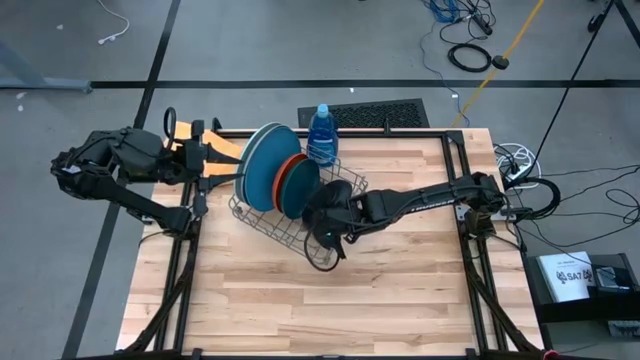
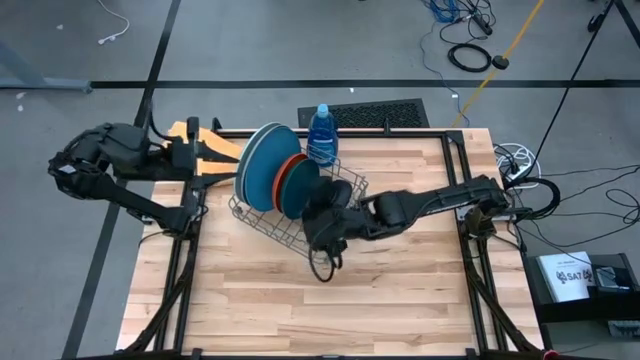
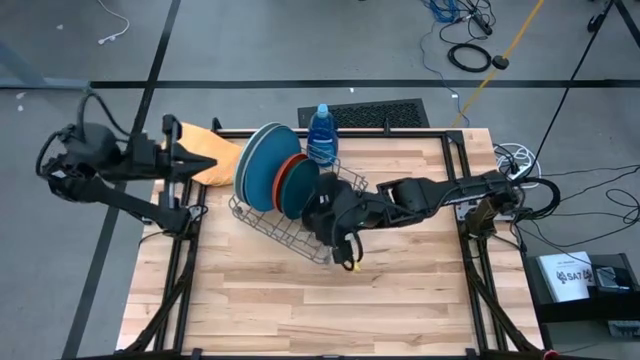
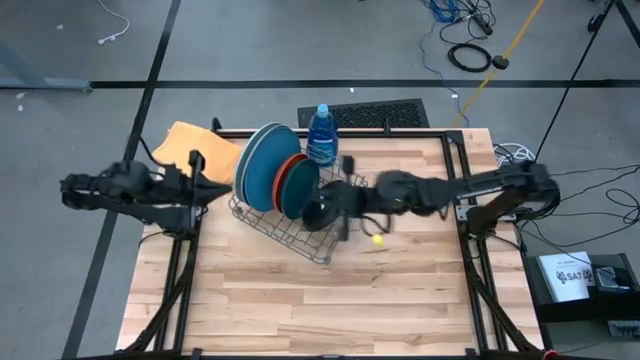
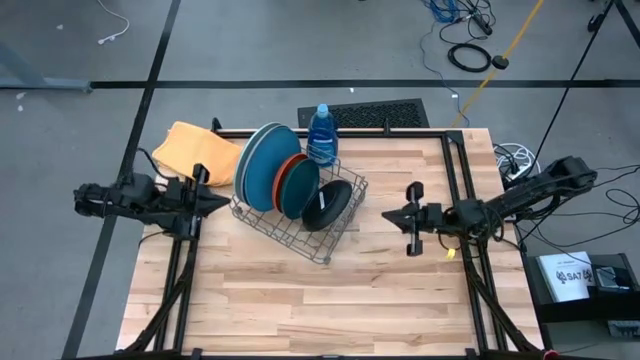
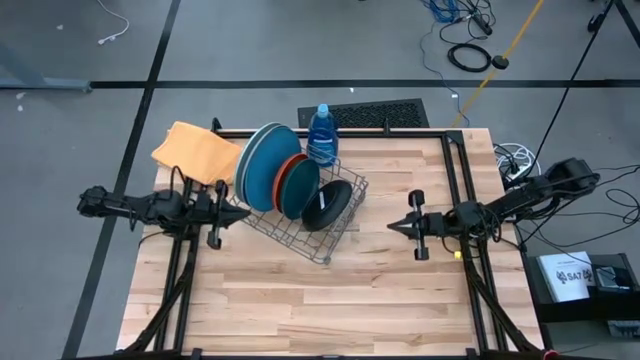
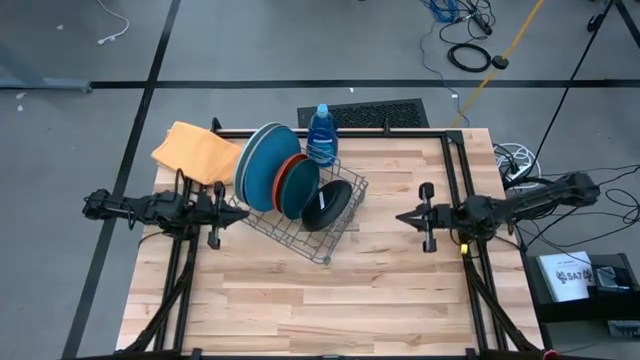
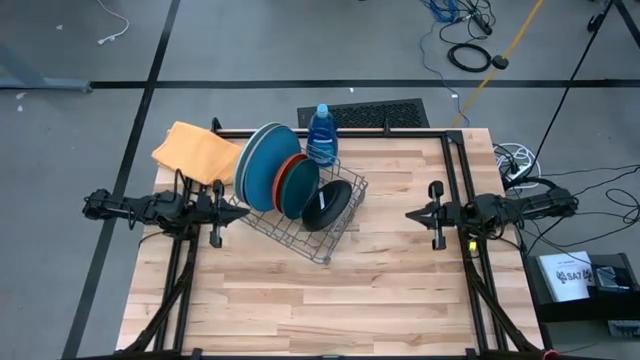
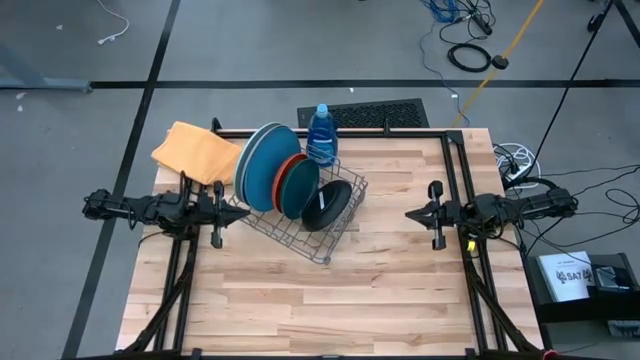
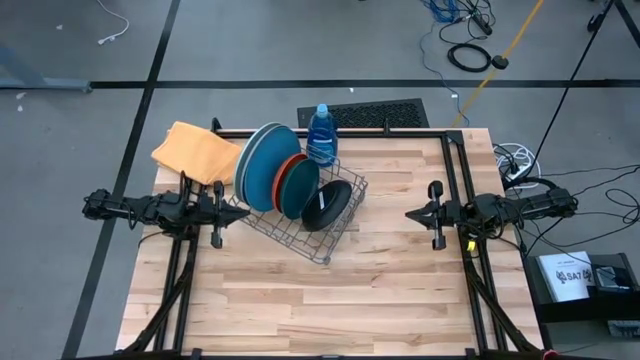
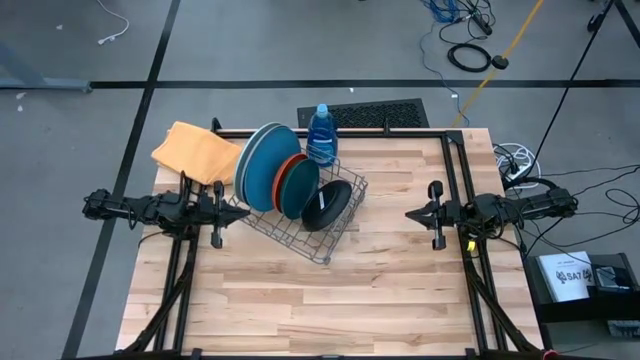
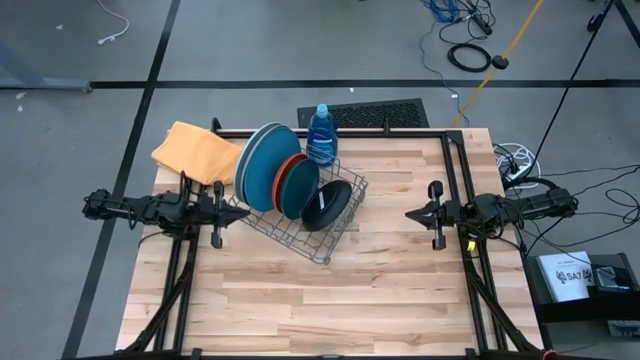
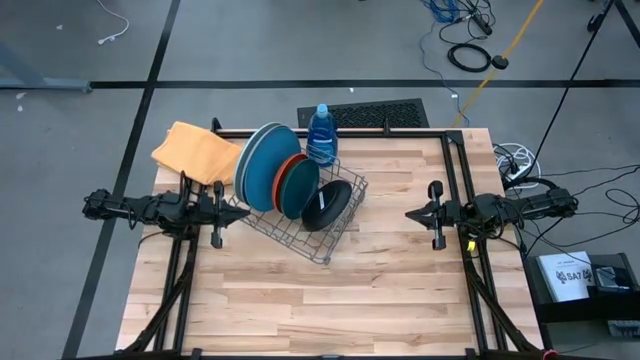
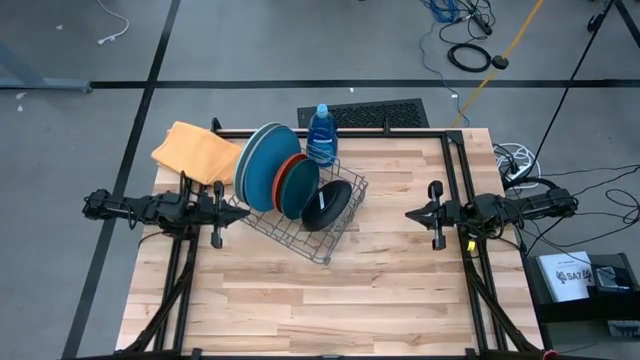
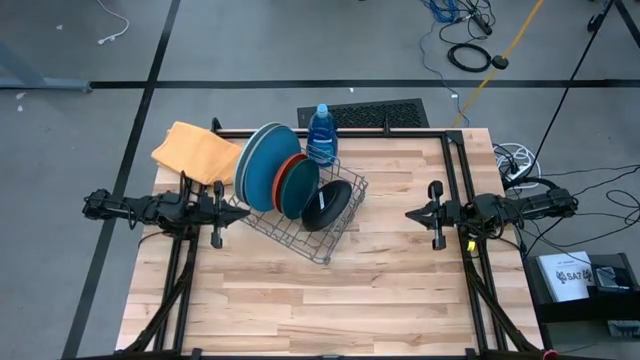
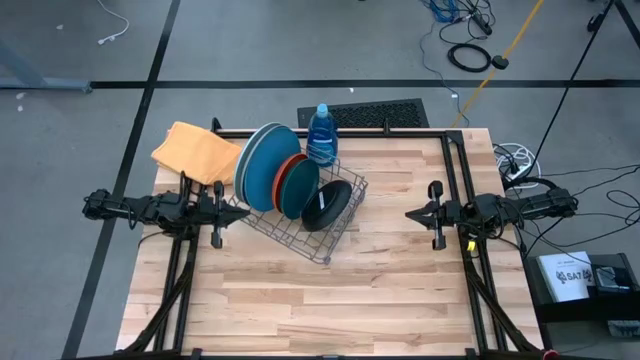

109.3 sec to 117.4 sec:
Task: Sort dishes
Return to Home Position

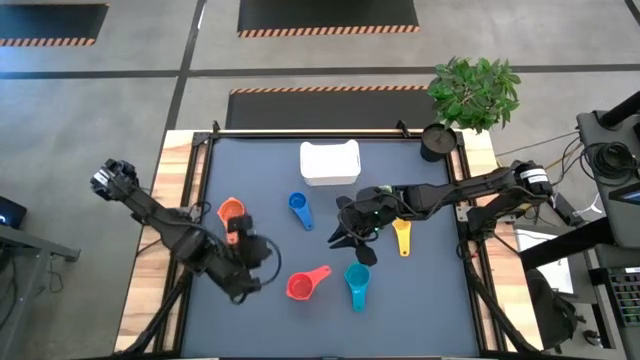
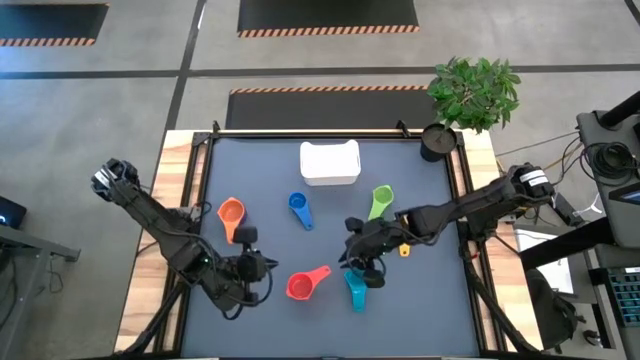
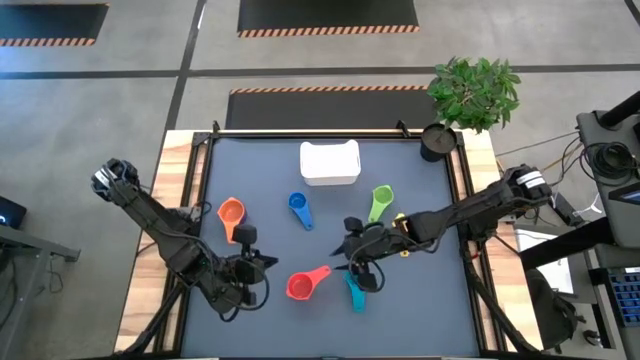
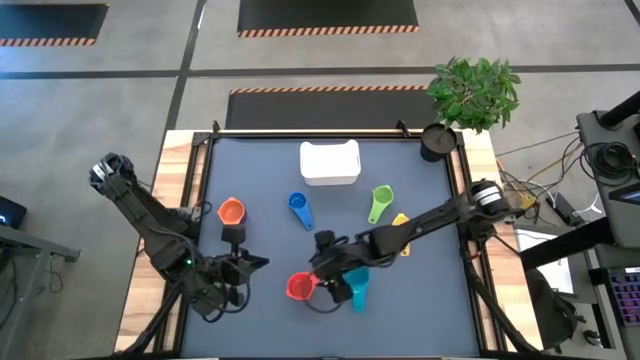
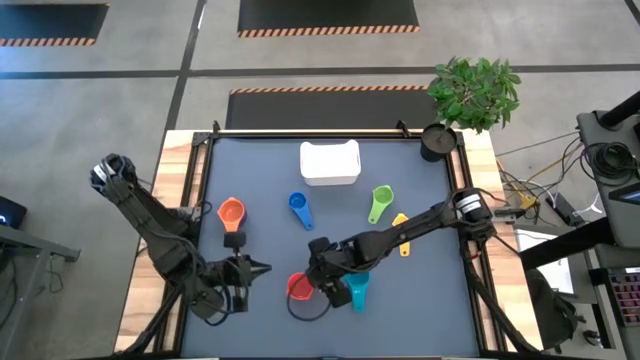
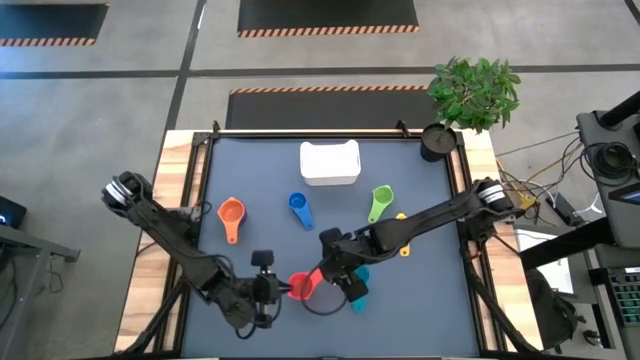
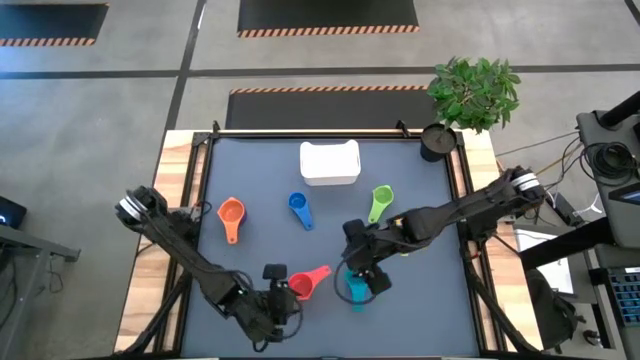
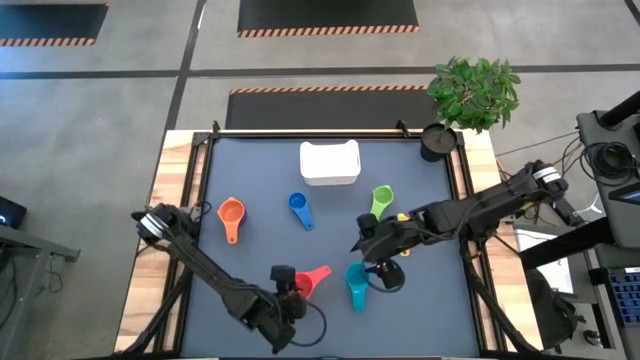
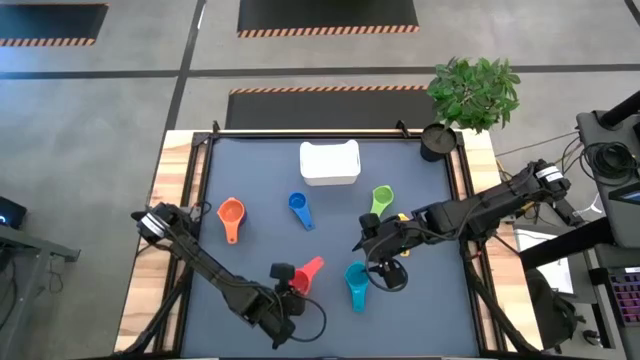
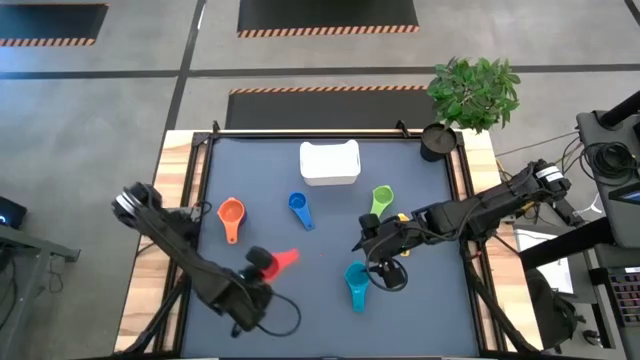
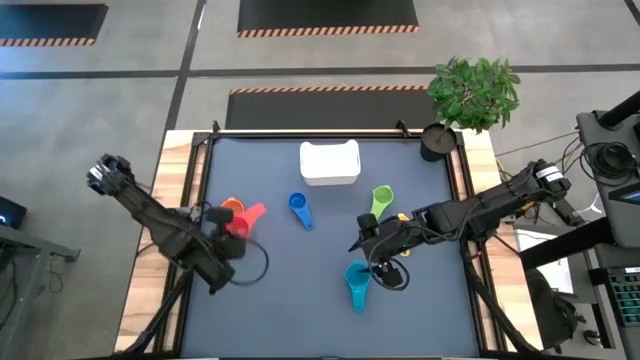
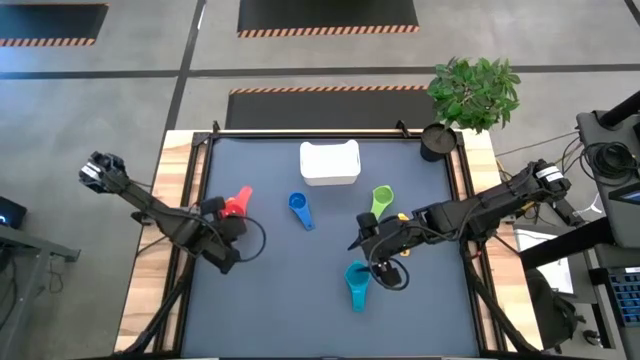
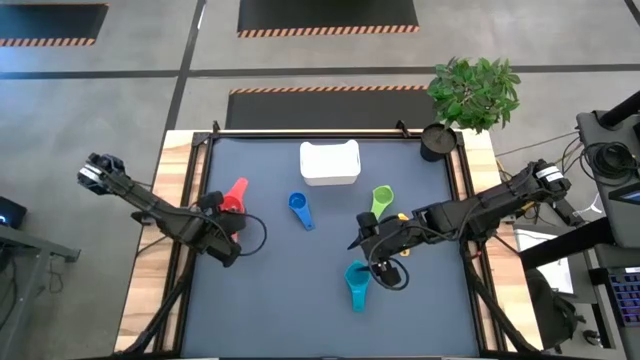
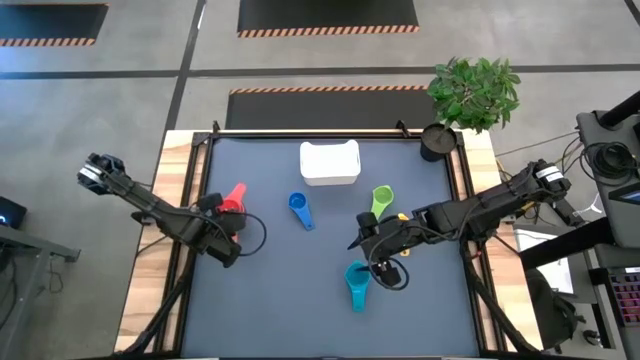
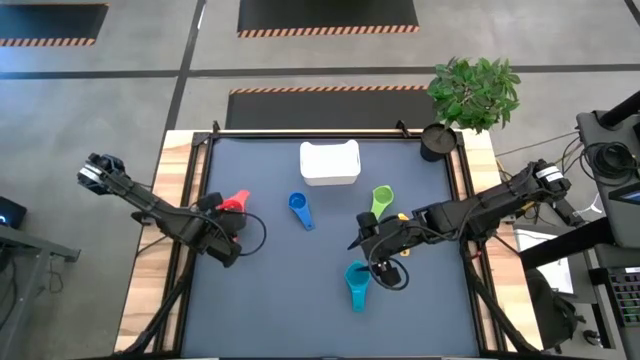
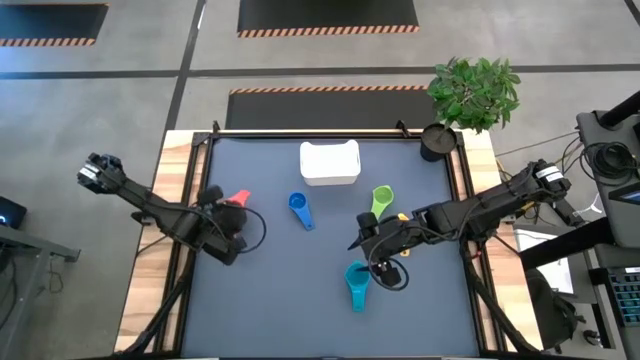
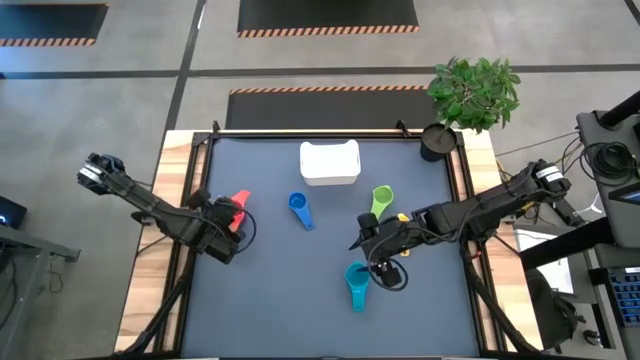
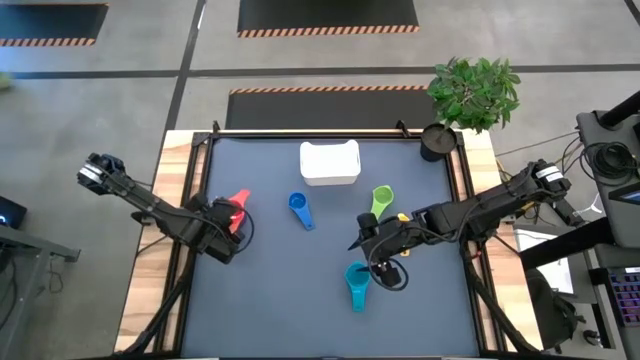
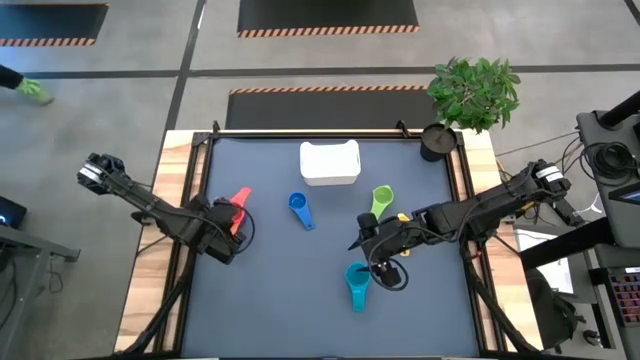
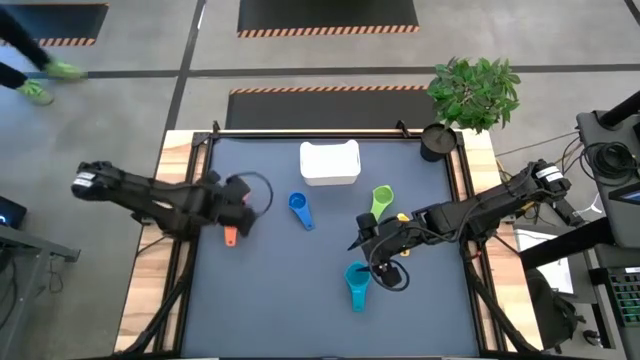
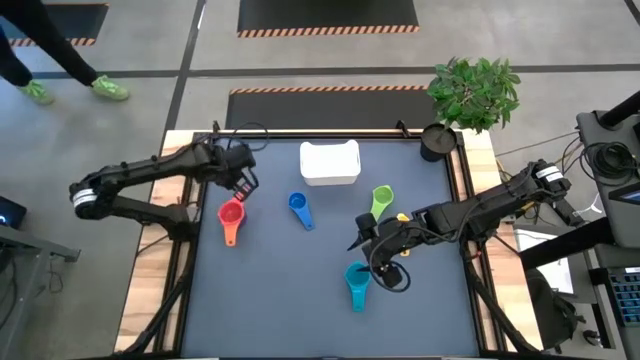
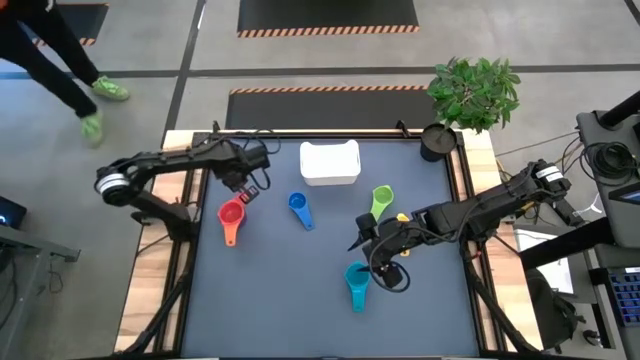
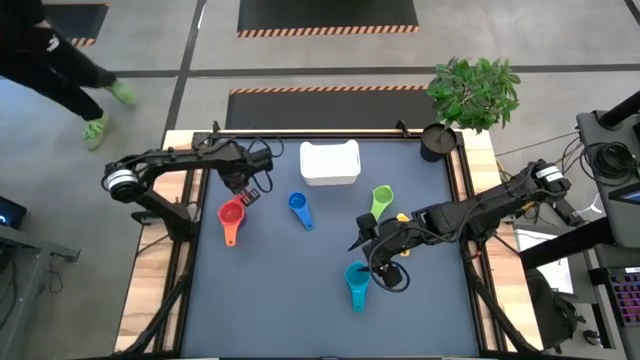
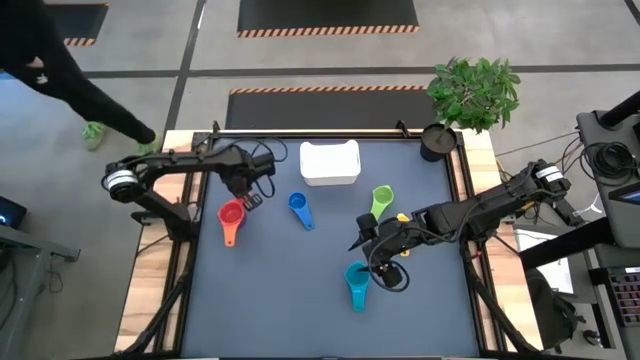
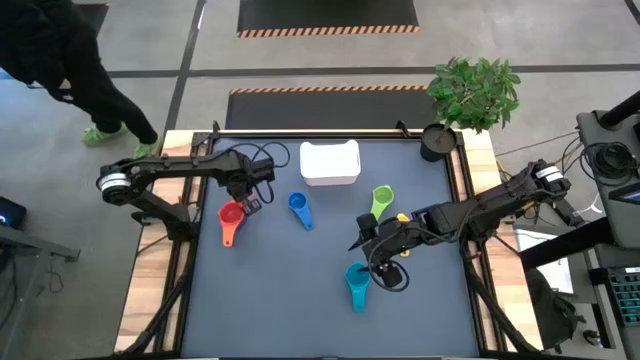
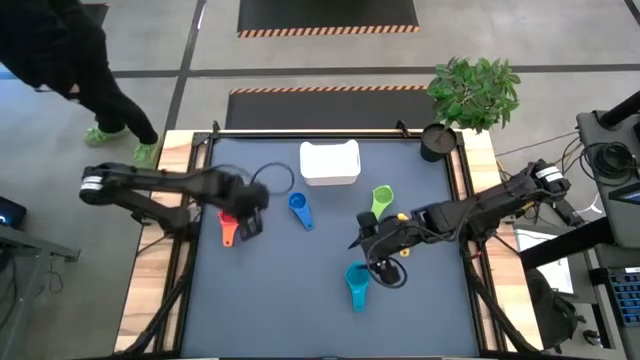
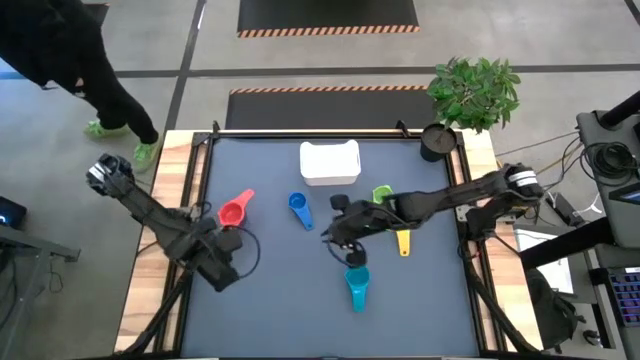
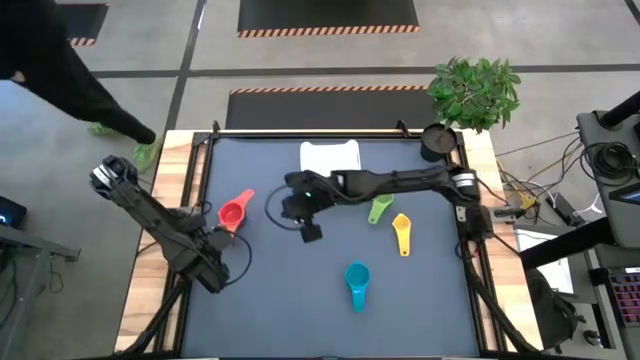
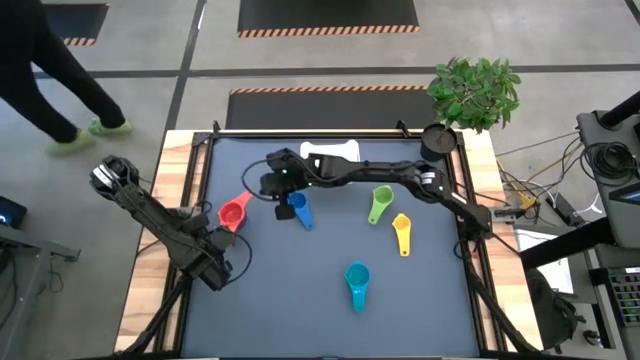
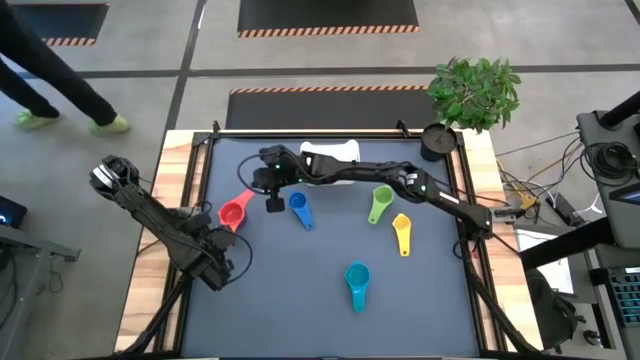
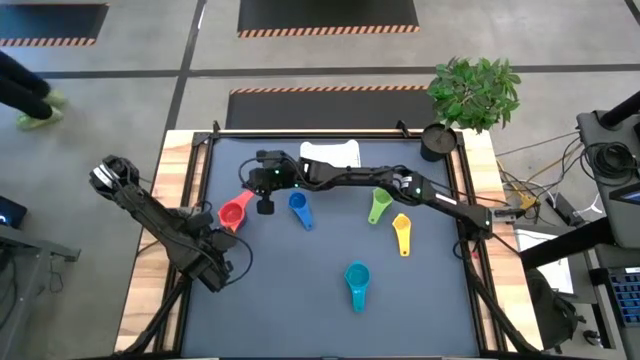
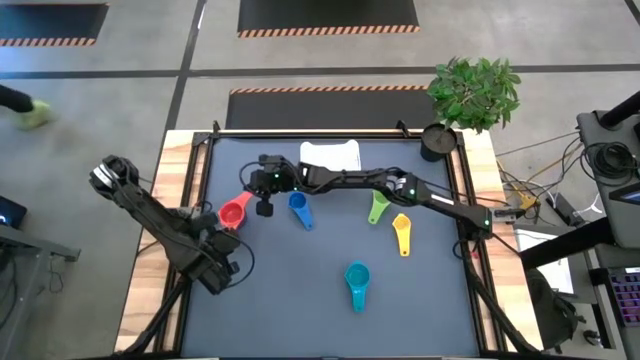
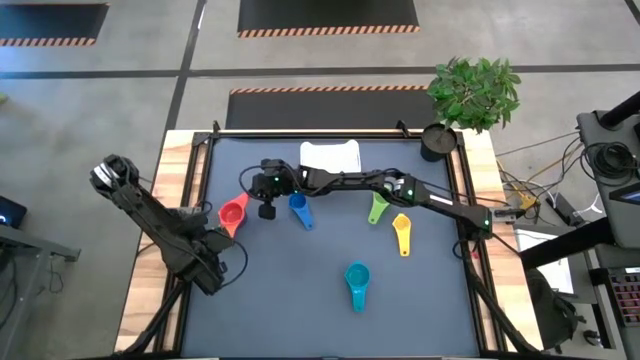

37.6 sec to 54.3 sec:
Task: Nest measuring cups in basket
Stack the red measuring cup on top of the orange measuring cup
